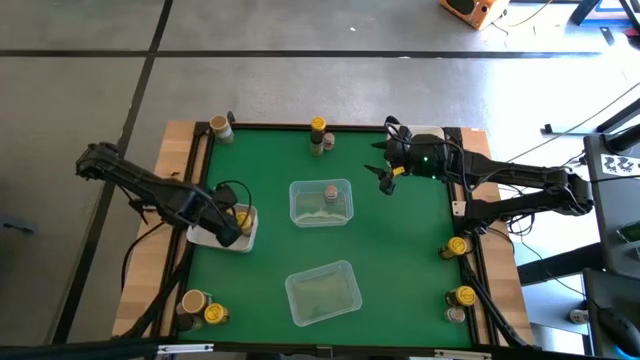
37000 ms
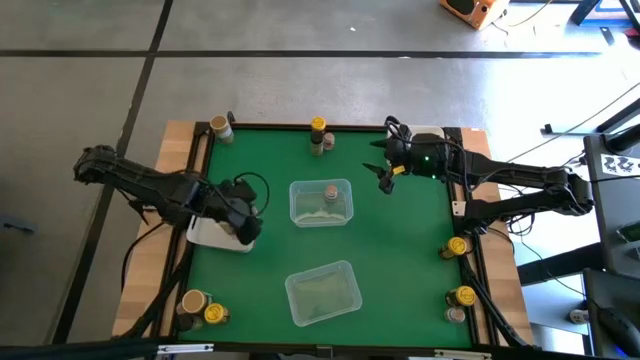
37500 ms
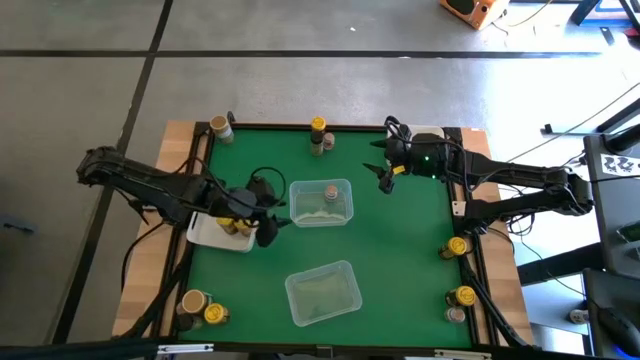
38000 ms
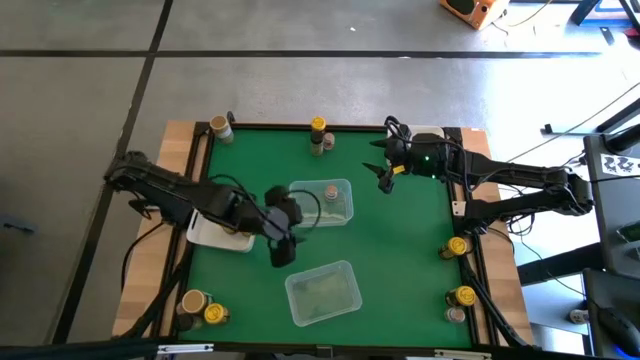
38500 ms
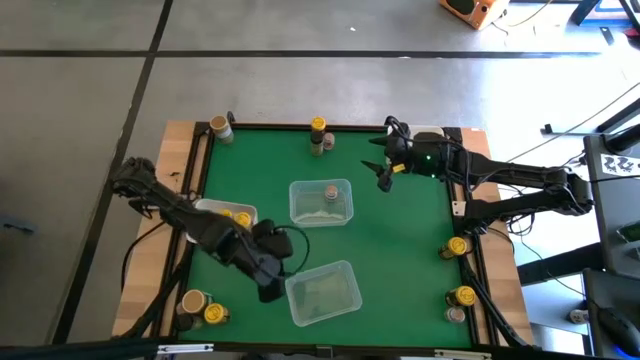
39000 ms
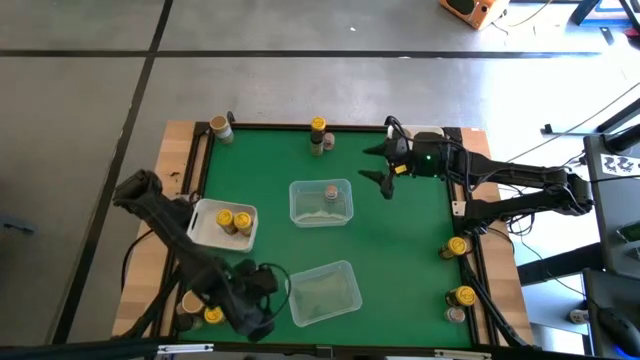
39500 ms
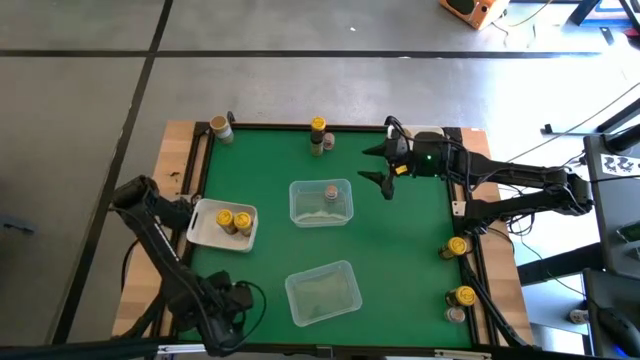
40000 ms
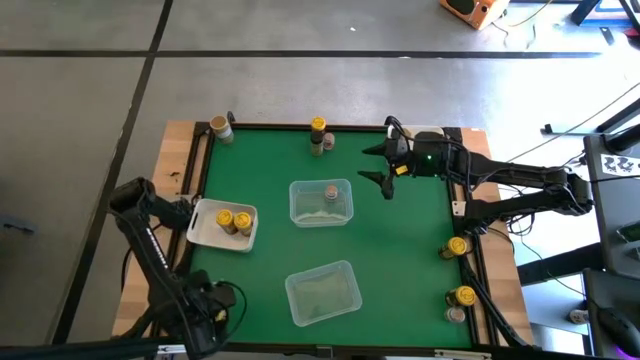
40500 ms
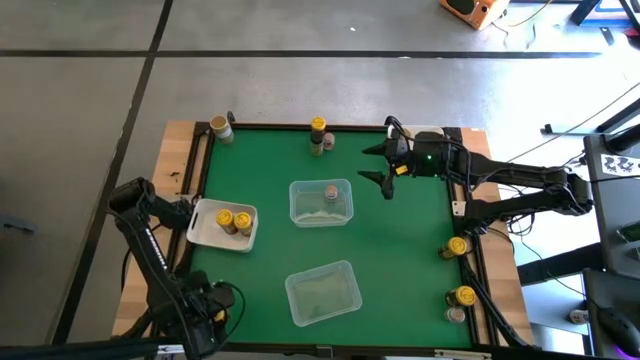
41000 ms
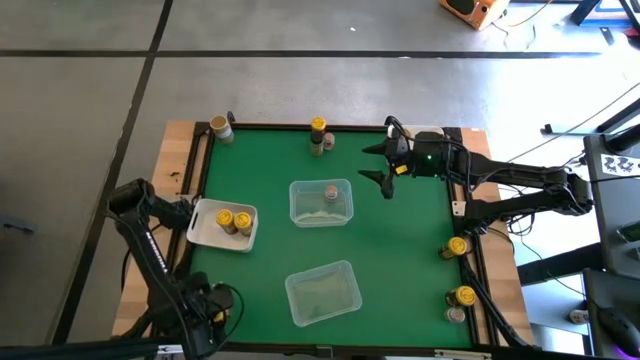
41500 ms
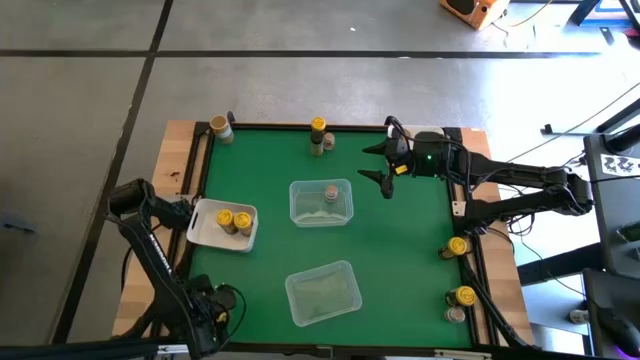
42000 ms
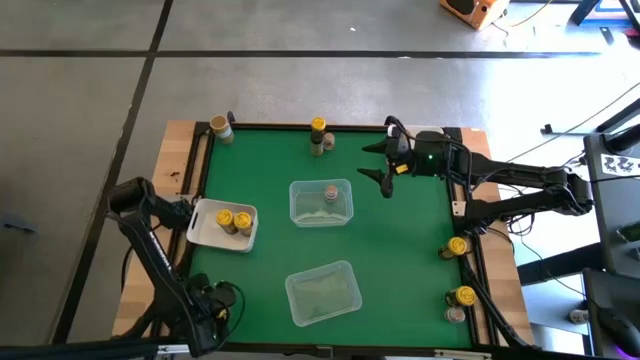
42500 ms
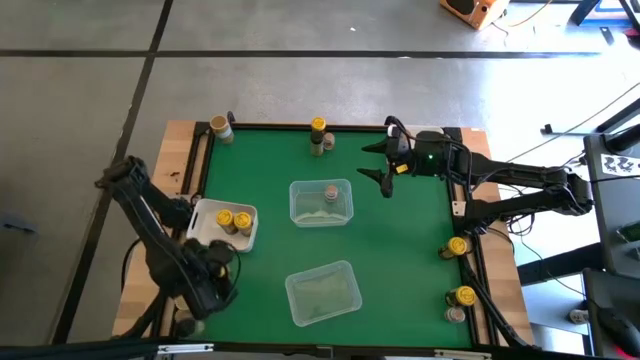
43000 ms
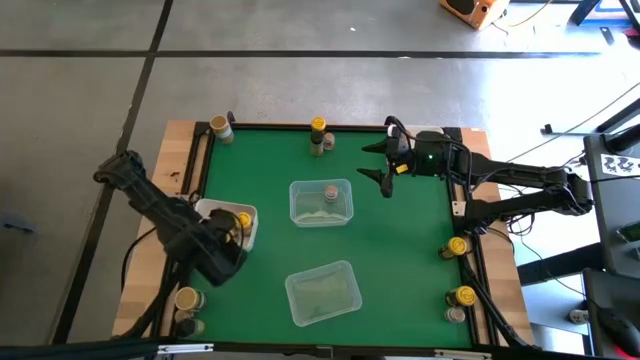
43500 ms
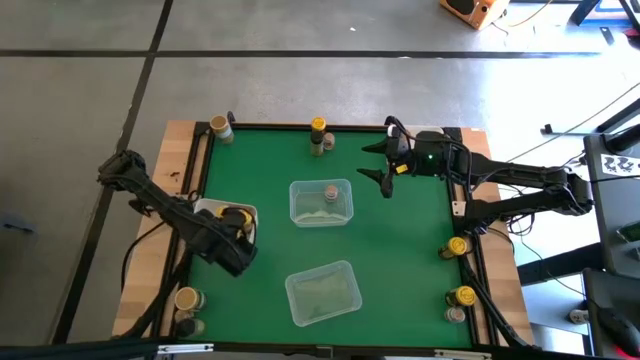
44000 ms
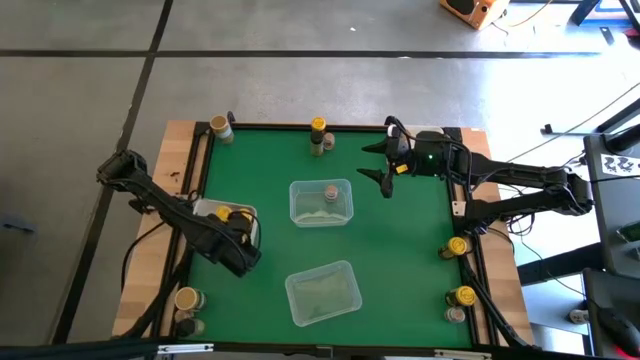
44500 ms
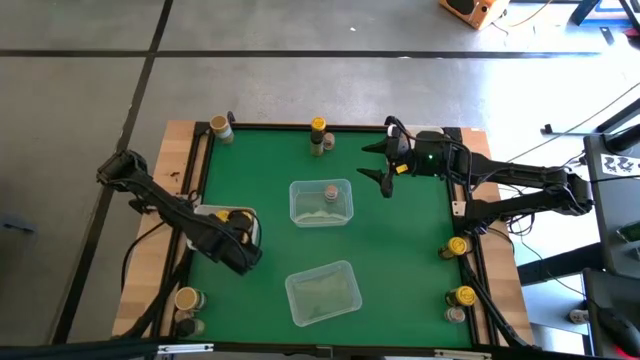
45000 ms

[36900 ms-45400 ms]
Task: Sort spices by type
Put the yellow spice can into the bottom white bin

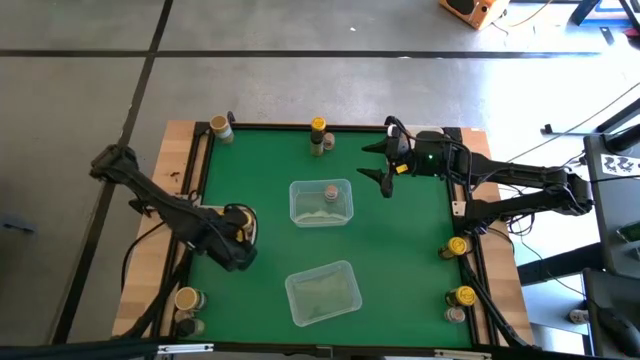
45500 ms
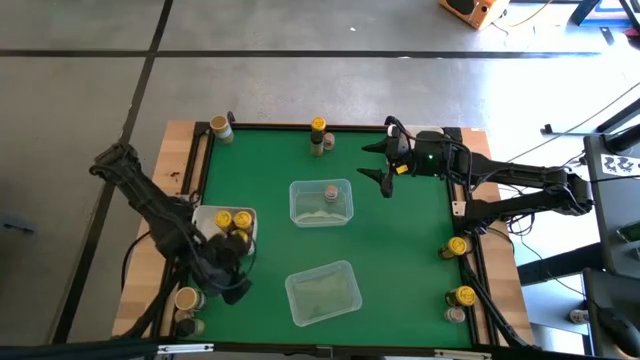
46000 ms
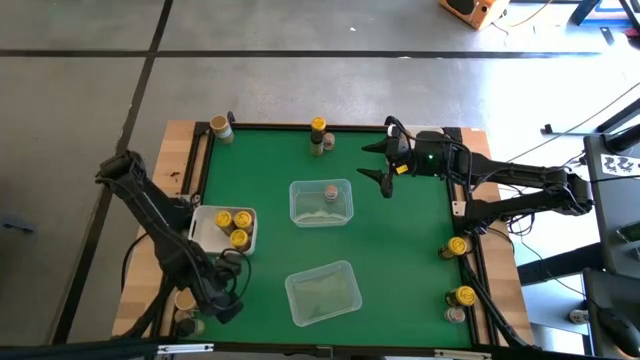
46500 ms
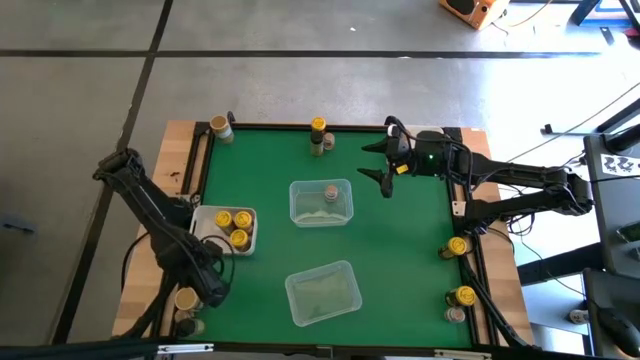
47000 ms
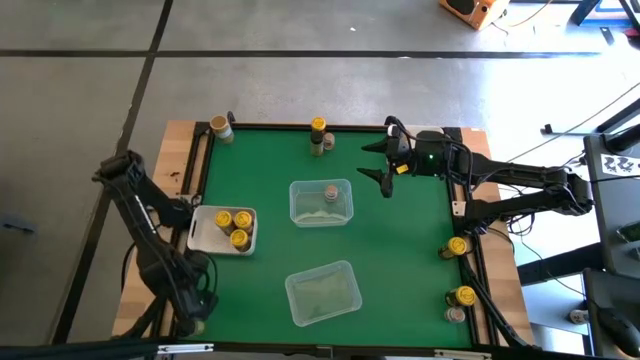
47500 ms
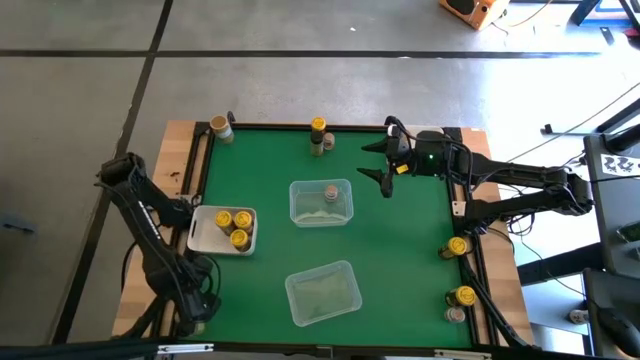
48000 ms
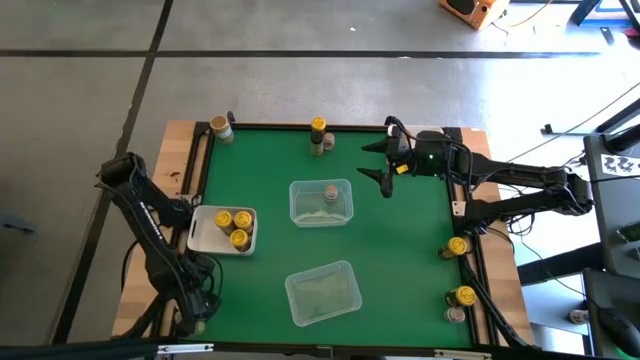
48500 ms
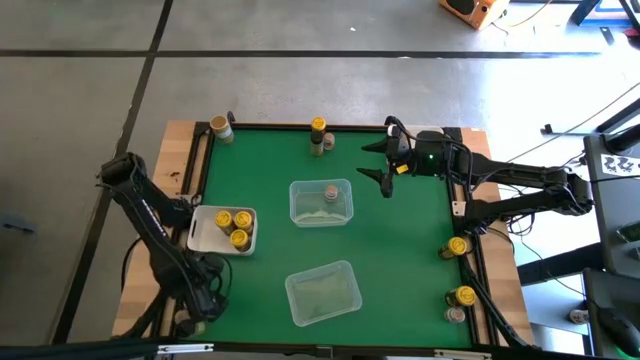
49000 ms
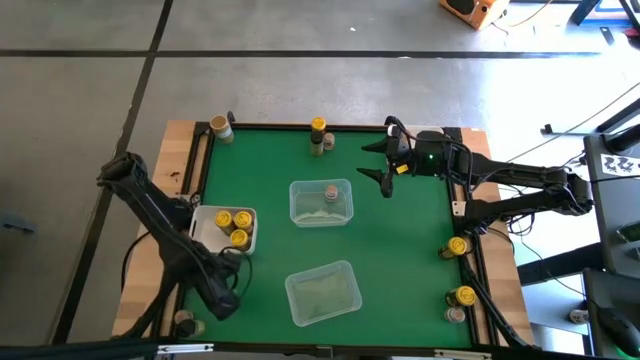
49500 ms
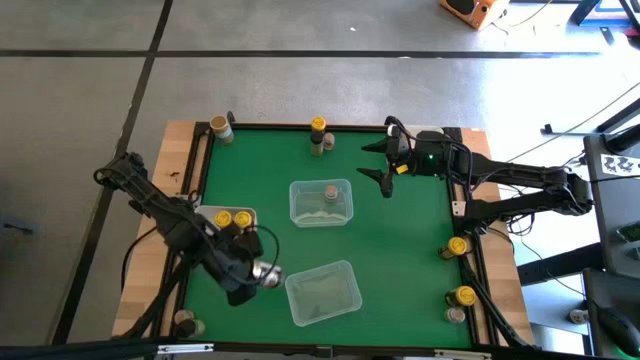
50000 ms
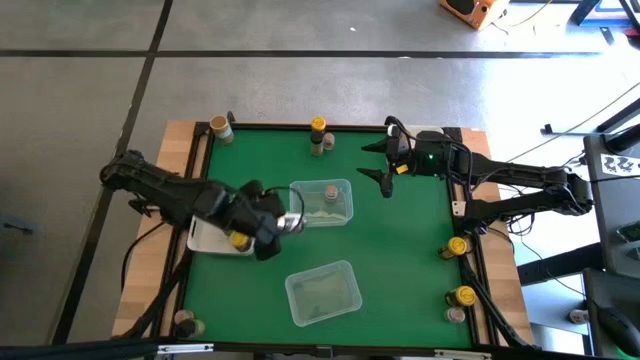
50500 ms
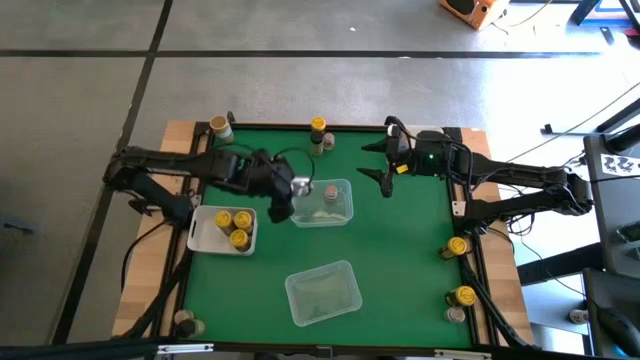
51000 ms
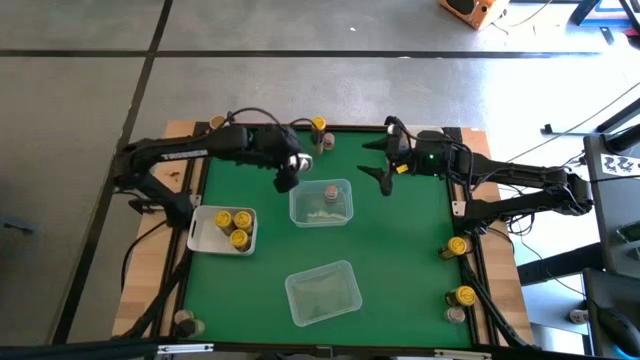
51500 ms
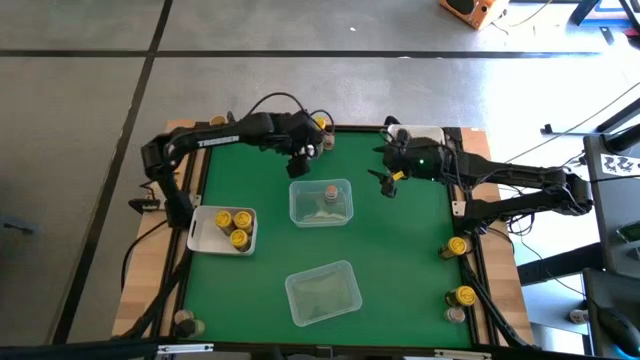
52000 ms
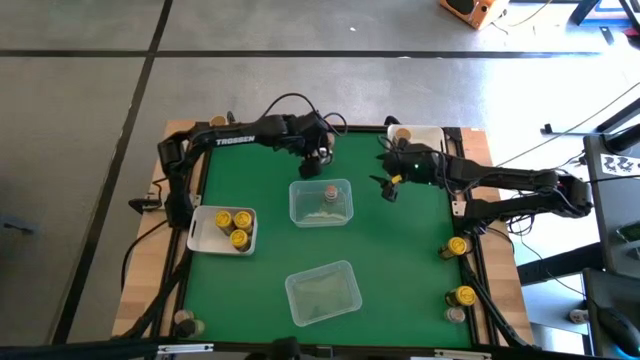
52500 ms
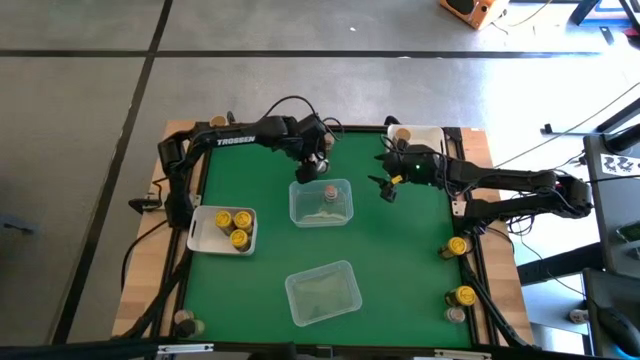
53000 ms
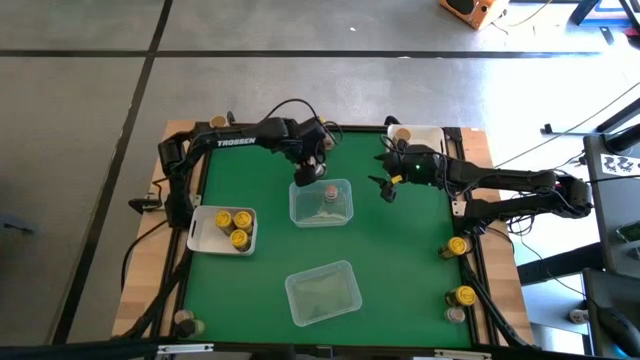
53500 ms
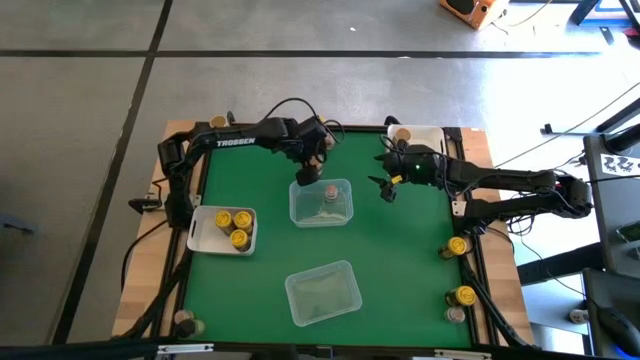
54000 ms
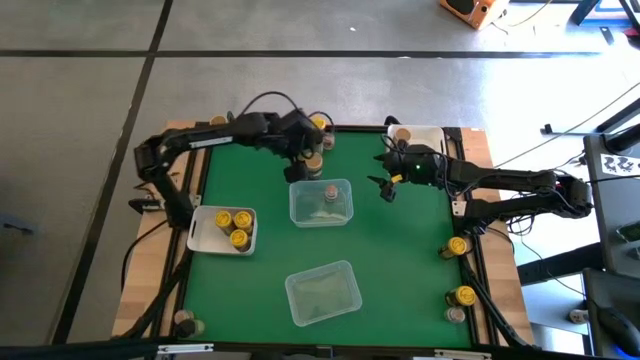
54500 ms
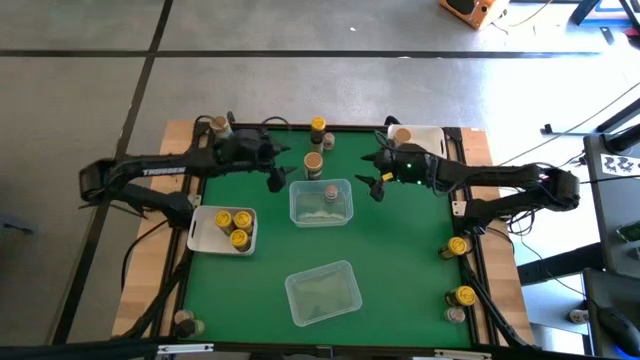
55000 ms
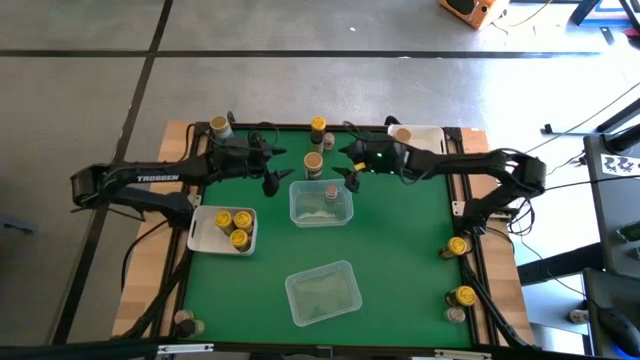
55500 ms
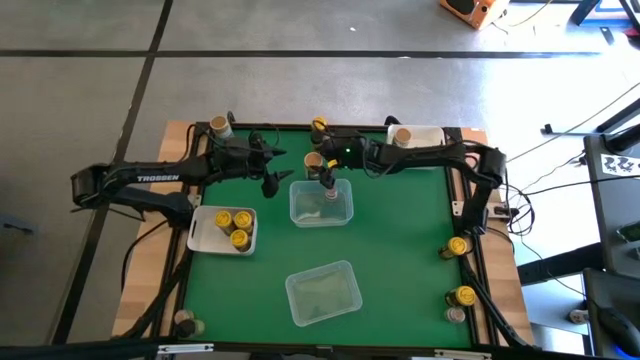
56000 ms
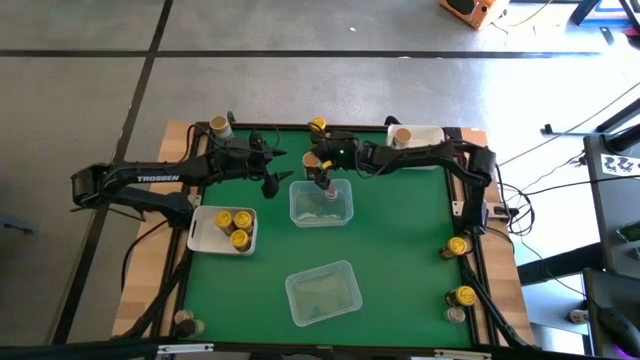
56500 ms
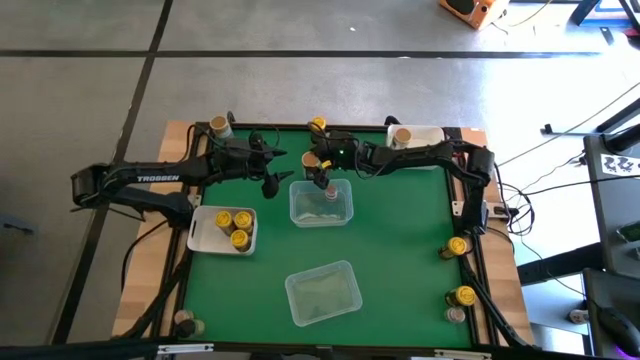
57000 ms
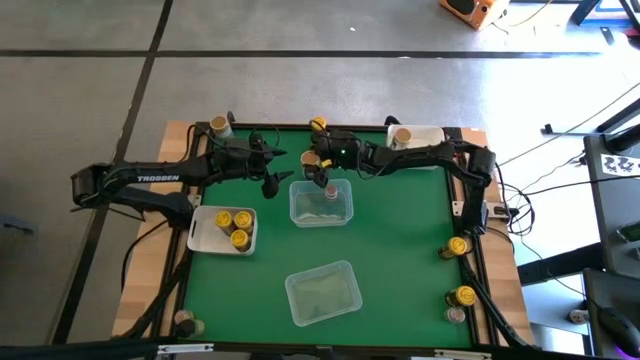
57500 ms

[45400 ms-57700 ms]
Put the golden spice bottle into the top white bin

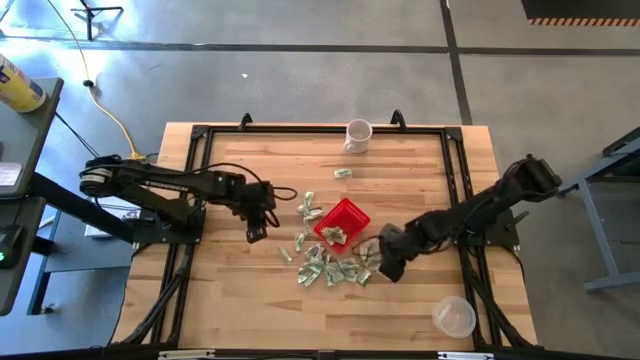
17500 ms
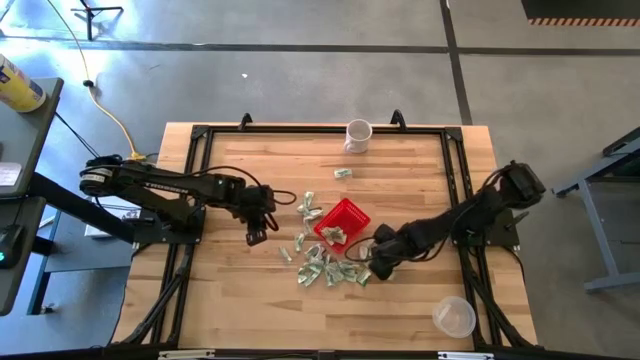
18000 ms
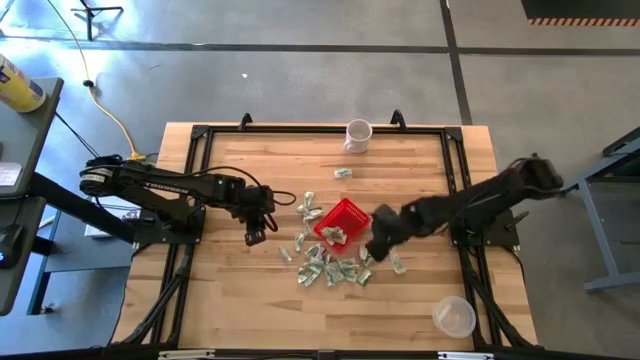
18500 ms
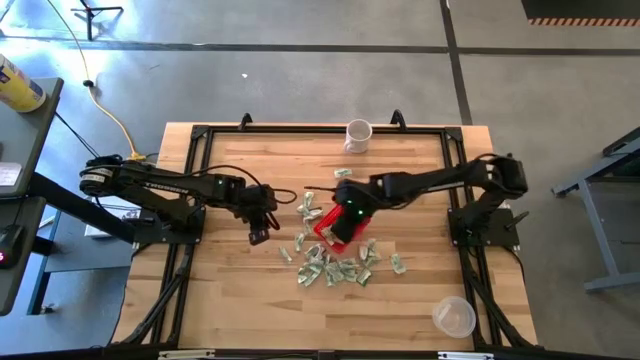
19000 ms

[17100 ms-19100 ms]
Task: Pick and place items into bin
Put the green truvia packet into the red bin

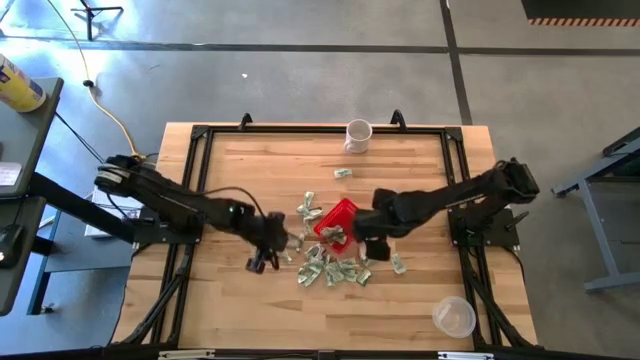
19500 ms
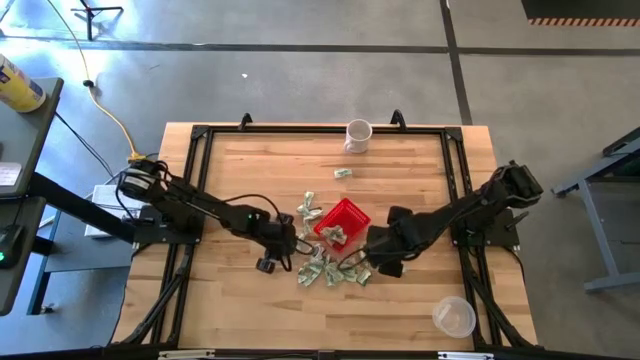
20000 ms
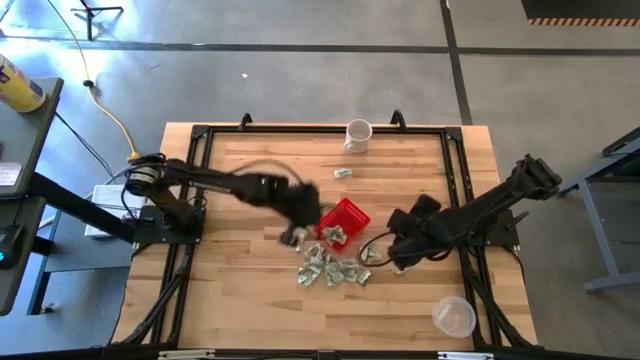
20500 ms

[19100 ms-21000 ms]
Put the white stevia packet into the red bin
